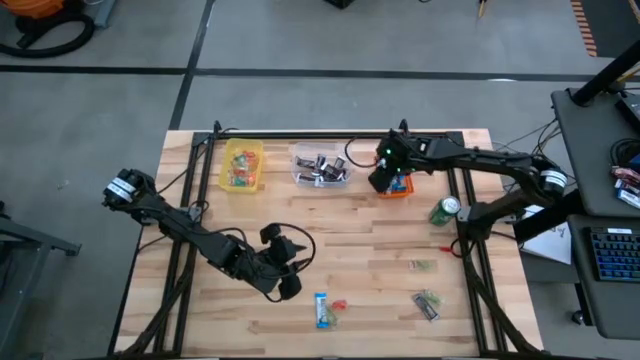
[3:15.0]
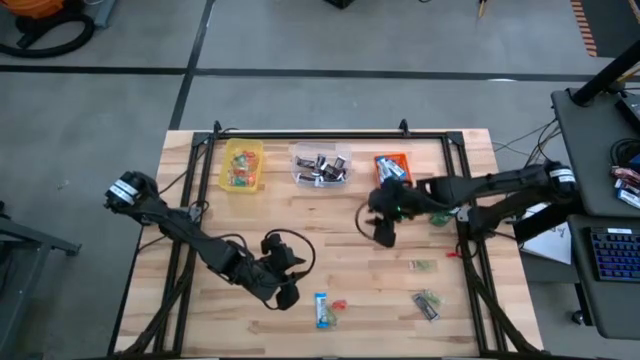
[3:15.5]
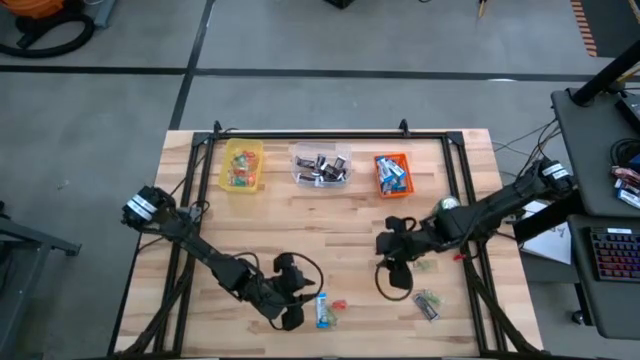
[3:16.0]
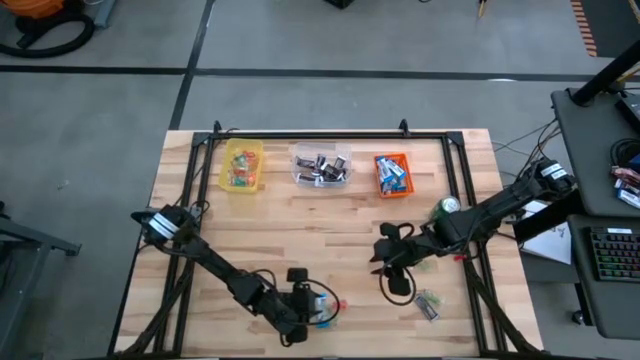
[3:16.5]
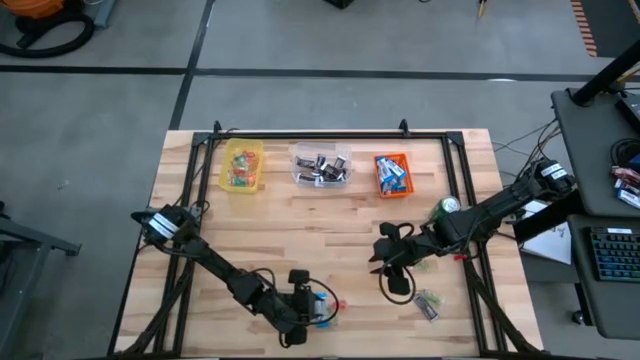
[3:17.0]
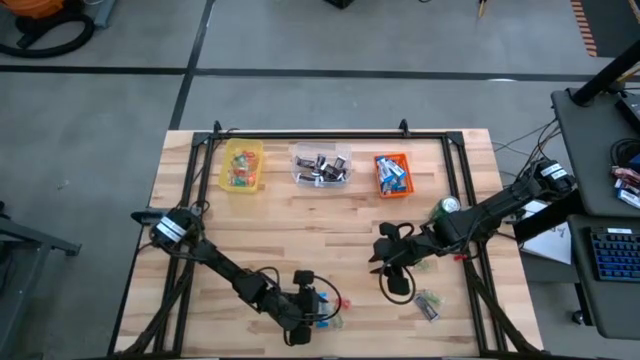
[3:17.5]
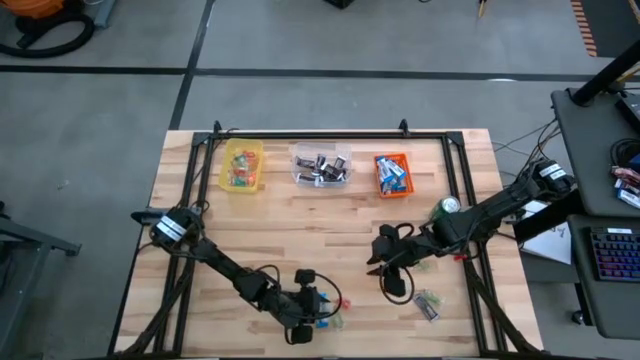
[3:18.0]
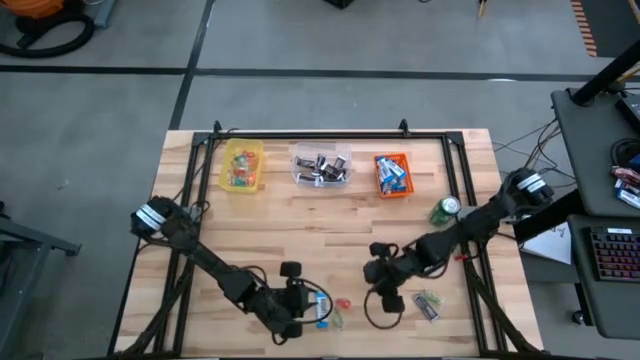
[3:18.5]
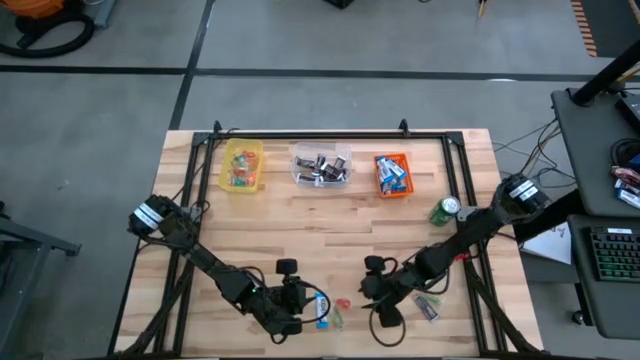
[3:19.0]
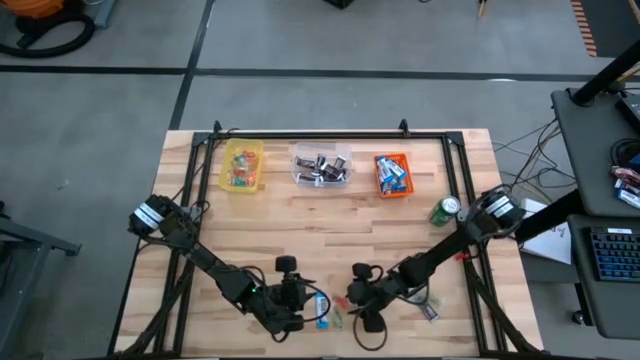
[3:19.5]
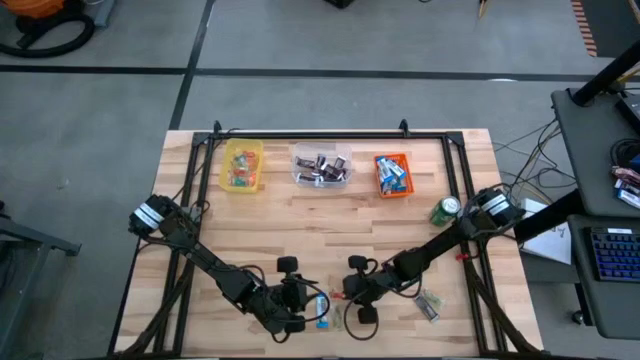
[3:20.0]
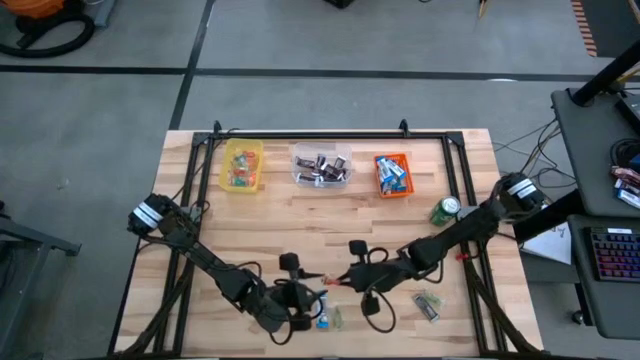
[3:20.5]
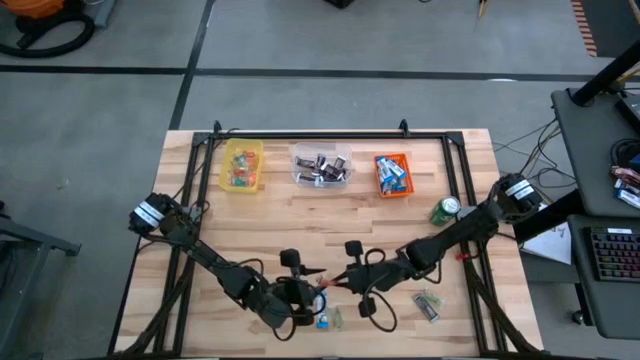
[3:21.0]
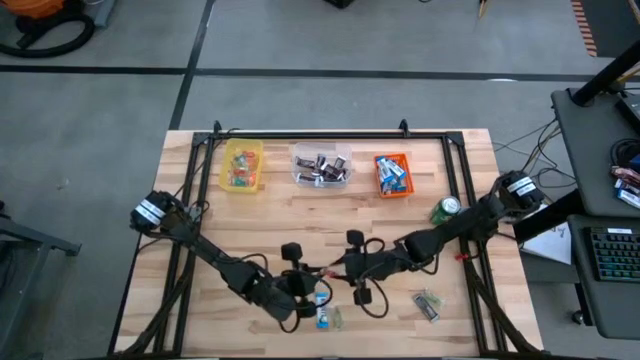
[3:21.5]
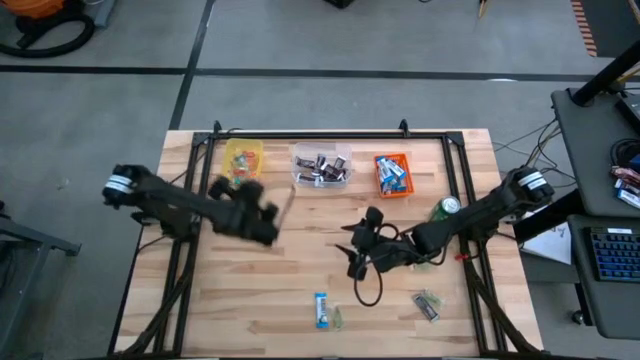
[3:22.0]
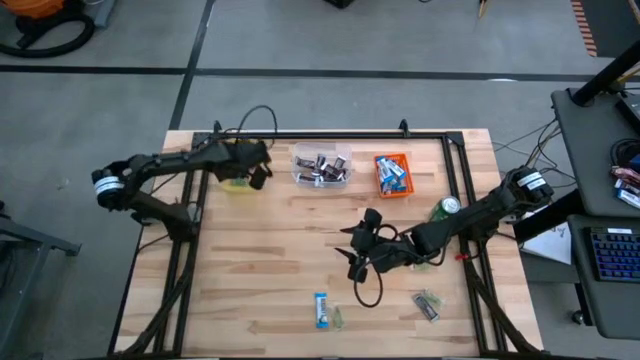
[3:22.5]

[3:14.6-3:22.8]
Task: Organize candy in baskets
Put the red gummy into the yellow bin

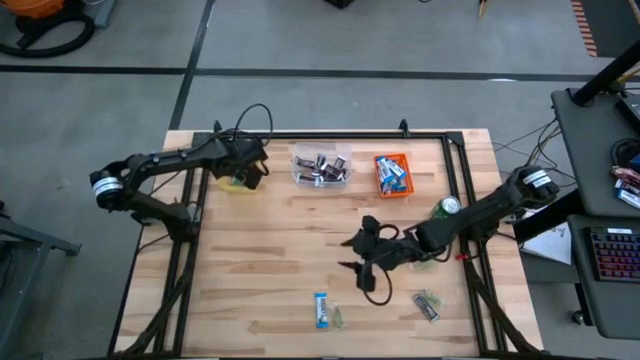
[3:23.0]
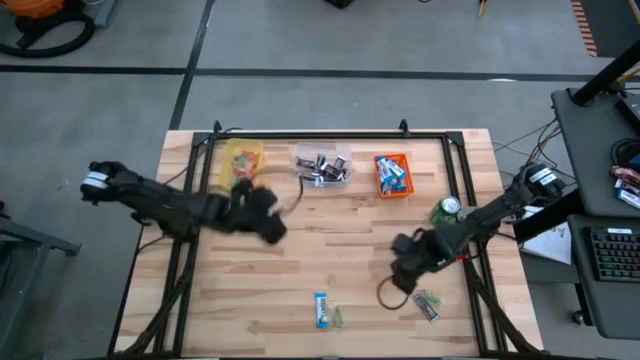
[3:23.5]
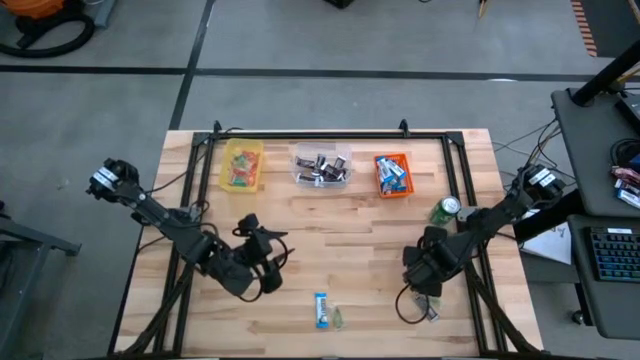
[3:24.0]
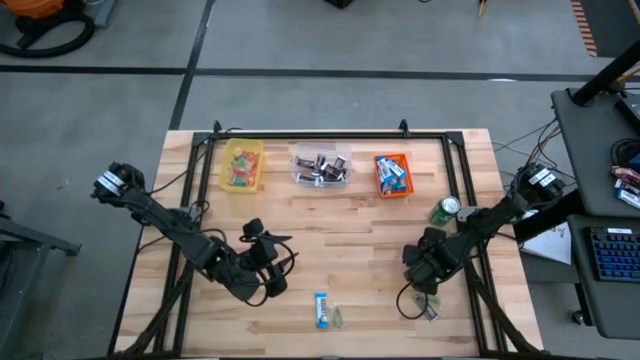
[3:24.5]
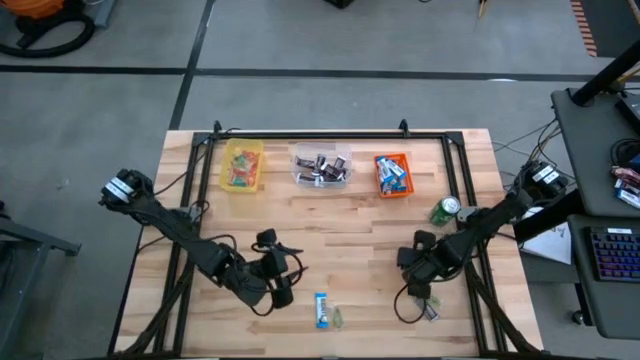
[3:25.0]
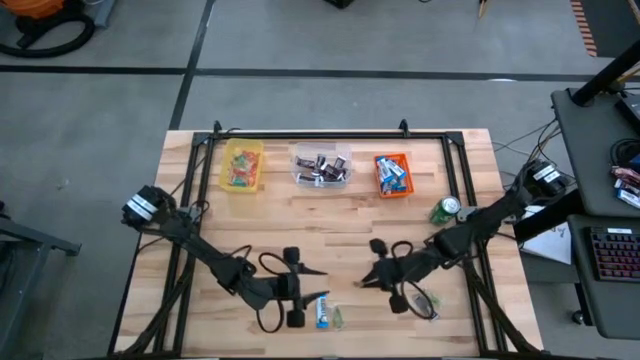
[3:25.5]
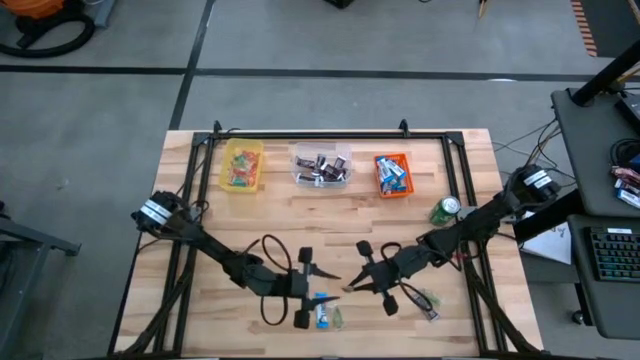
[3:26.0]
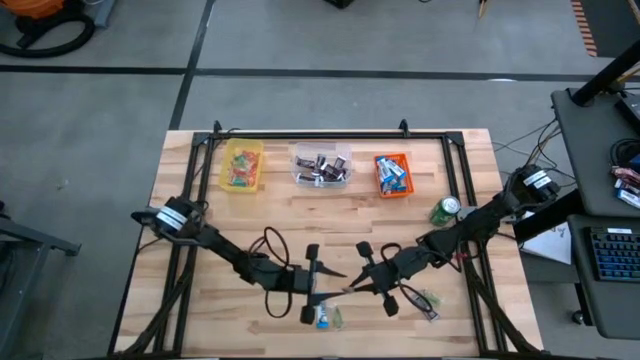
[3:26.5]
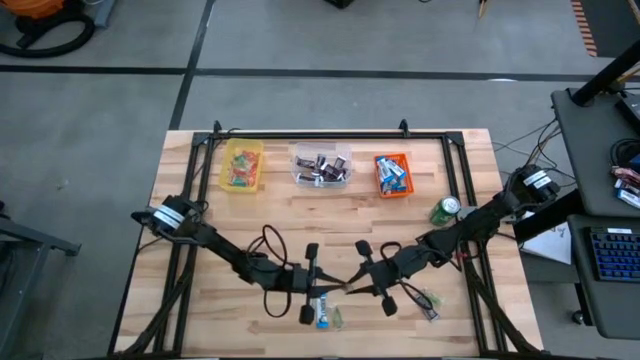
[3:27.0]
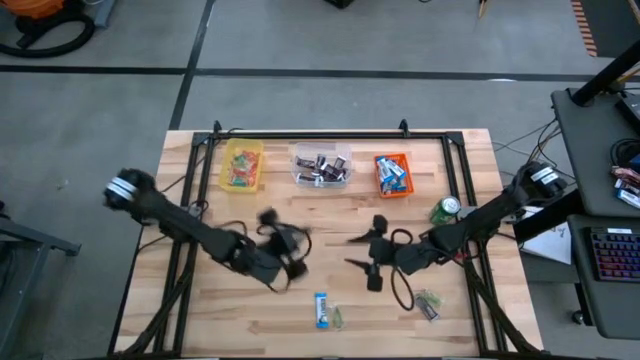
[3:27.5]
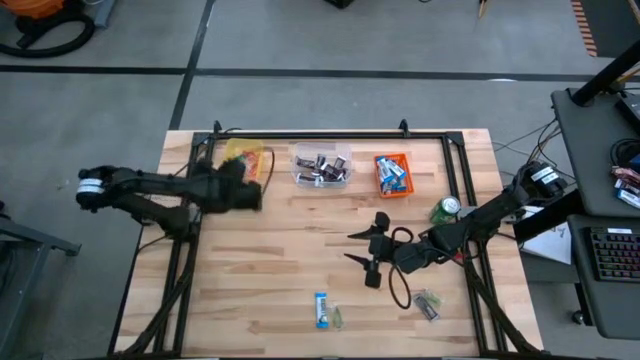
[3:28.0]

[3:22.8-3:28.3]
Put the green gummy into the yellow bin

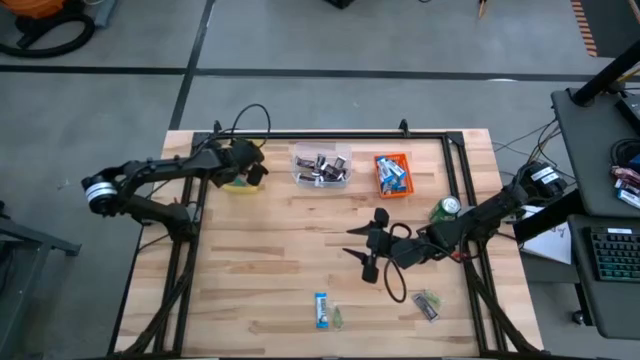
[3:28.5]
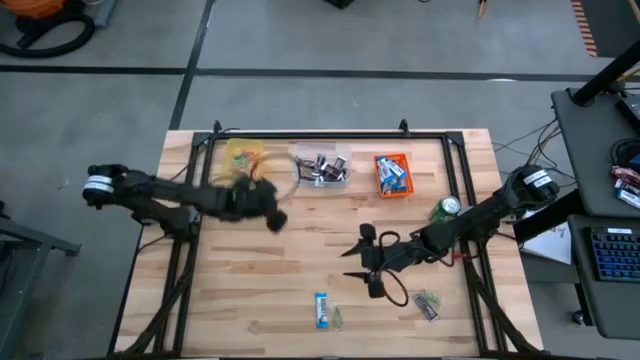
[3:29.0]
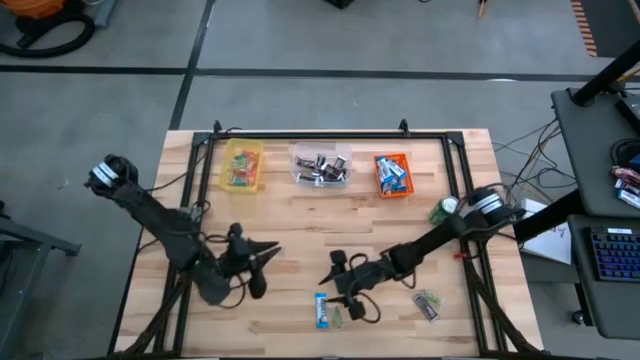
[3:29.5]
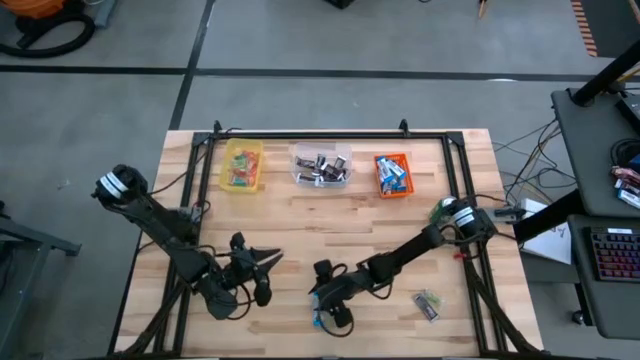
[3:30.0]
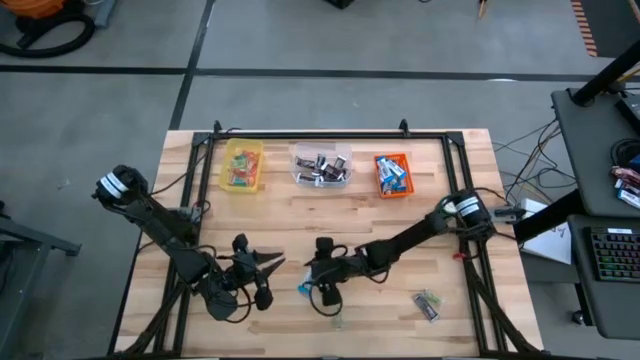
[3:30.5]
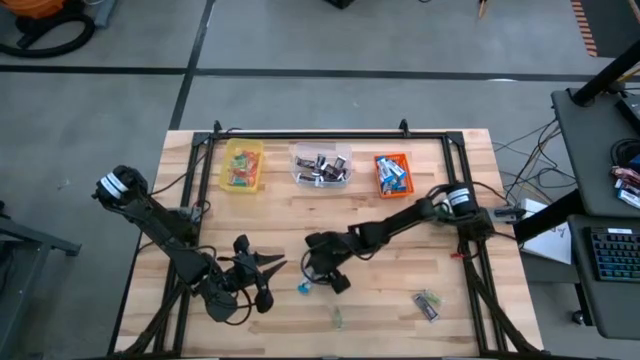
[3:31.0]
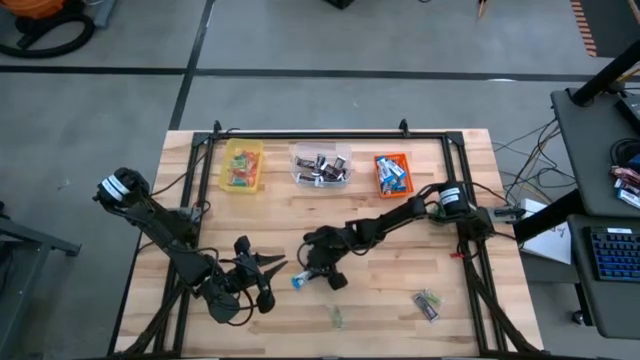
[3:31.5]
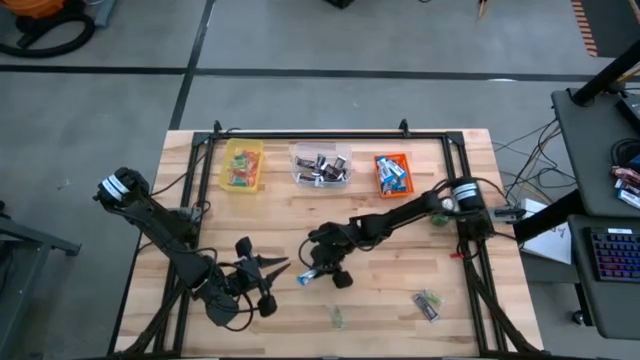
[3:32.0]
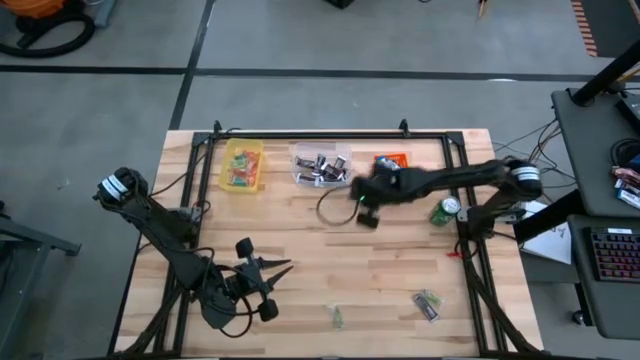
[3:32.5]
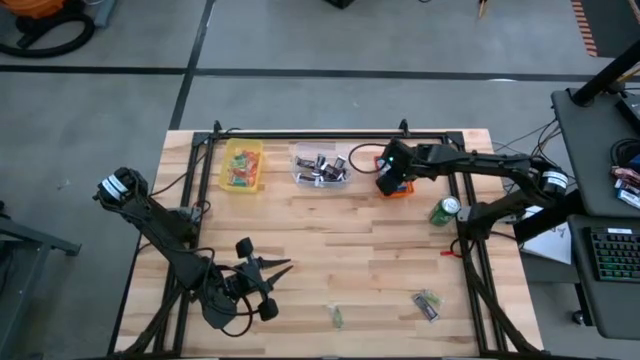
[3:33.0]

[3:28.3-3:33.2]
Put the white chocolate bar chocolate into the orange bin

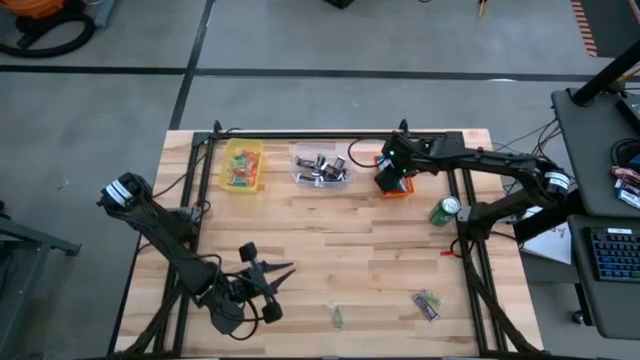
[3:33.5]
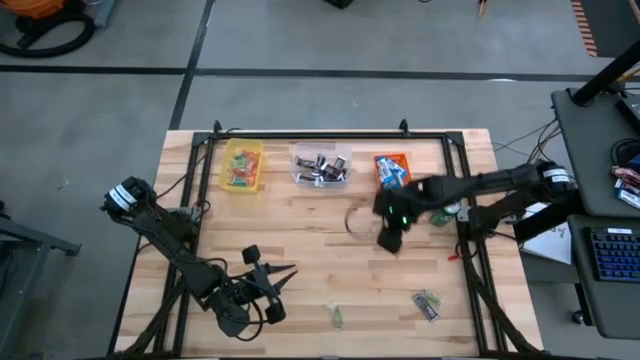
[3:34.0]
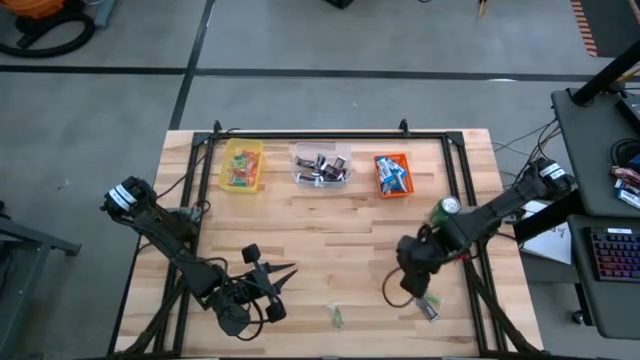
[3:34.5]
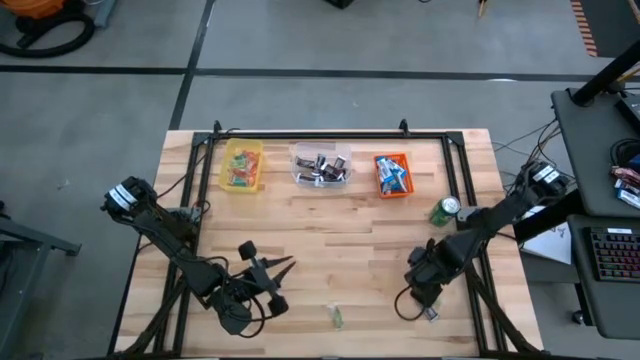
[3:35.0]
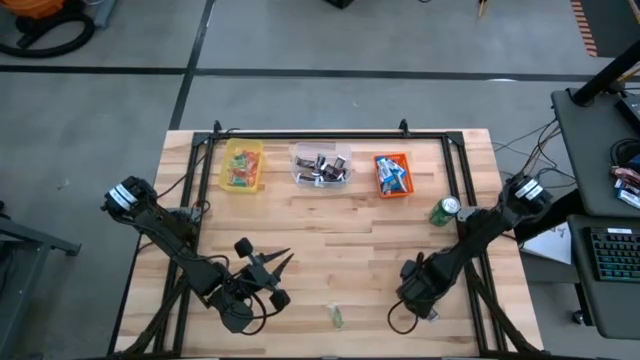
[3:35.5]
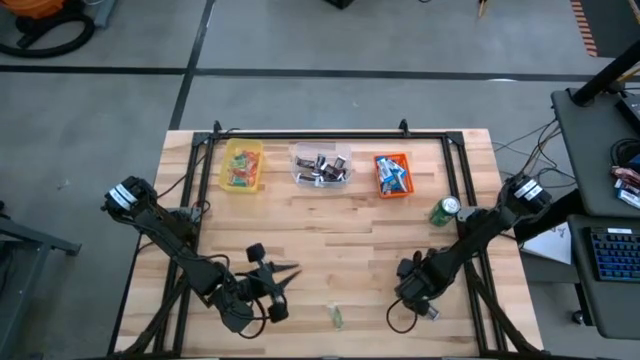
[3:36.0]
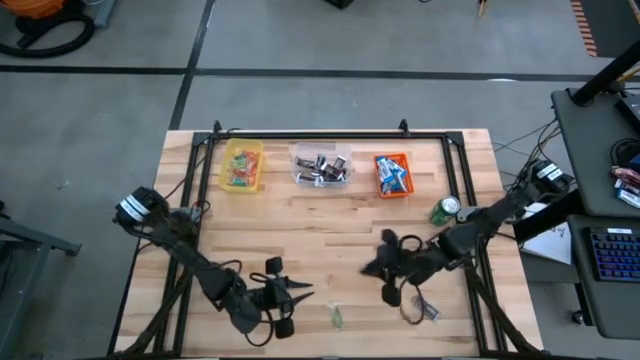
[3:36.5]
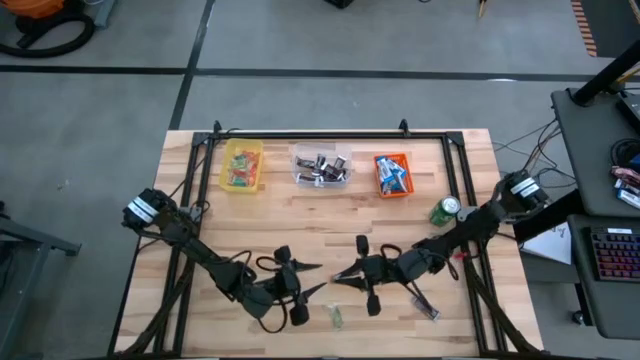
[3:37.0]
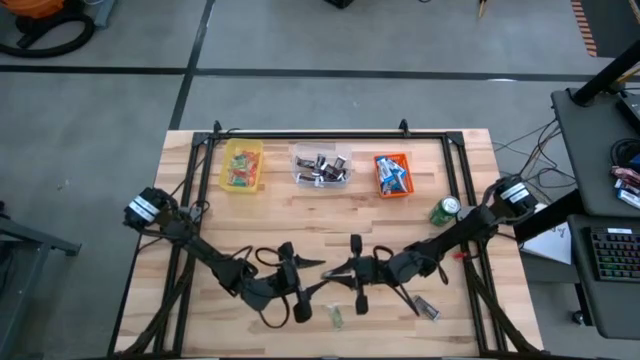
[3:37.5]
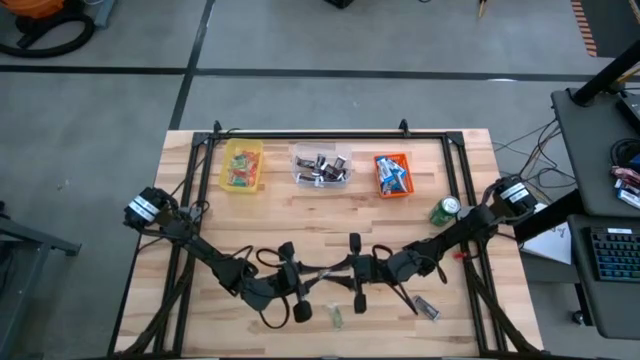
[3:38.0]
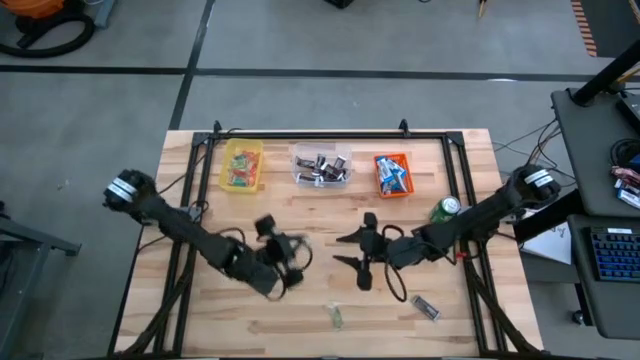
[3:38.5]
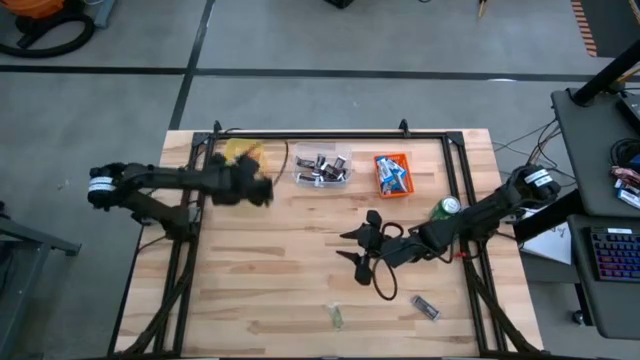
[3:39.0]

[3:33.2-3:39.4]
Put the green gummy into the yellow bin
